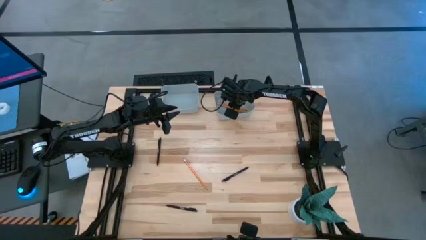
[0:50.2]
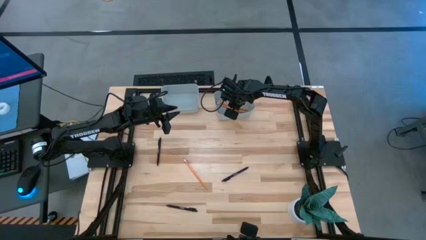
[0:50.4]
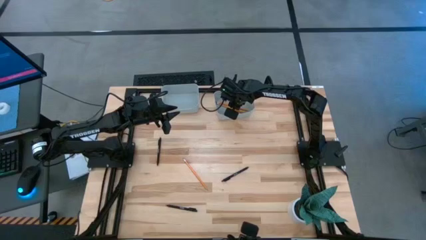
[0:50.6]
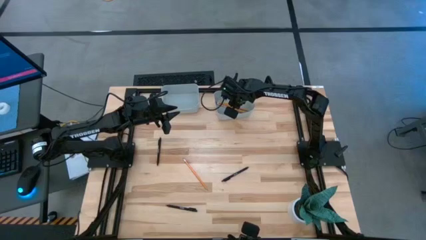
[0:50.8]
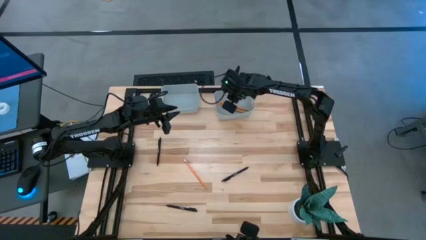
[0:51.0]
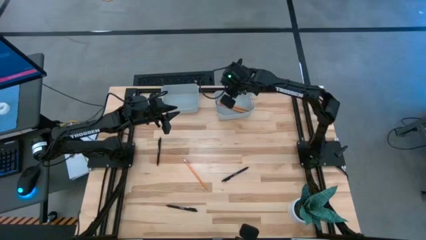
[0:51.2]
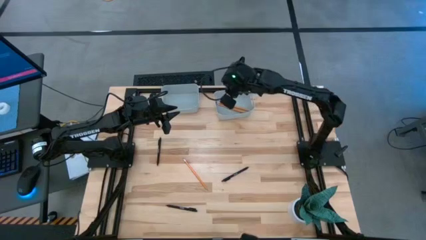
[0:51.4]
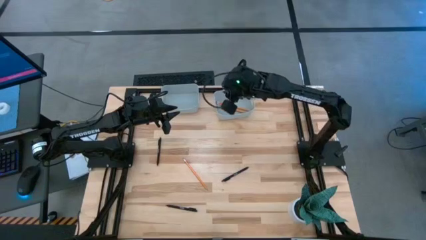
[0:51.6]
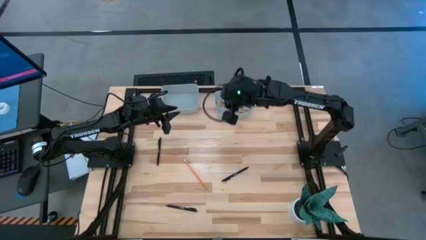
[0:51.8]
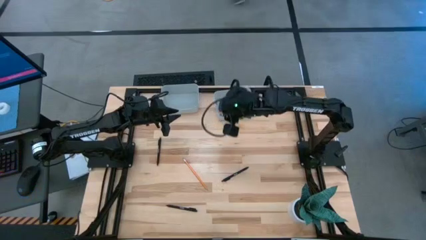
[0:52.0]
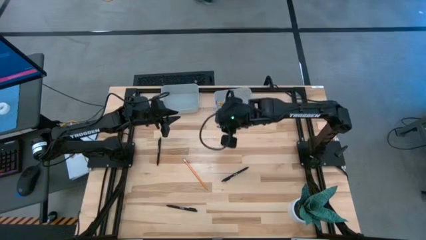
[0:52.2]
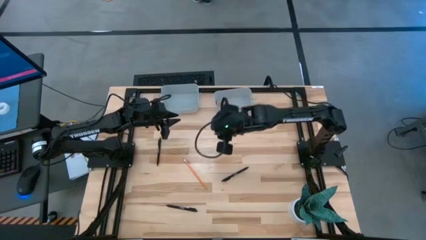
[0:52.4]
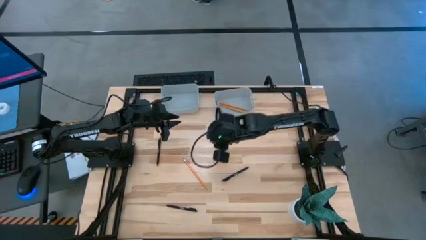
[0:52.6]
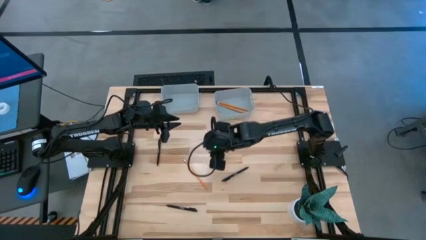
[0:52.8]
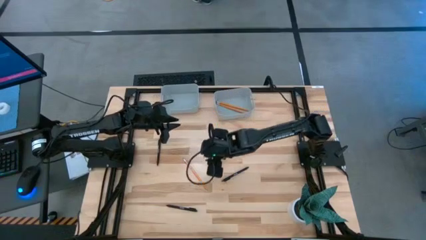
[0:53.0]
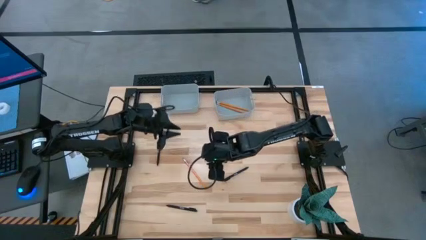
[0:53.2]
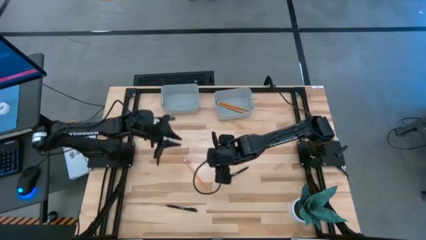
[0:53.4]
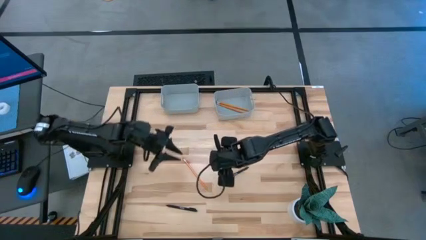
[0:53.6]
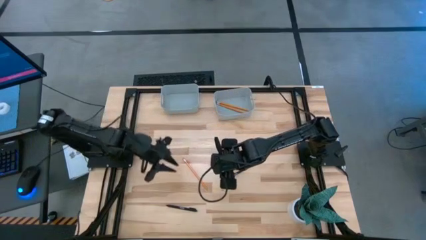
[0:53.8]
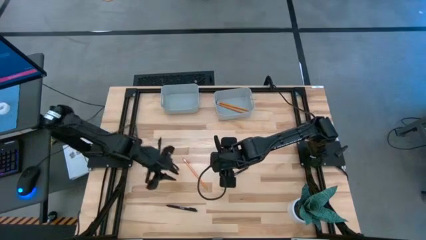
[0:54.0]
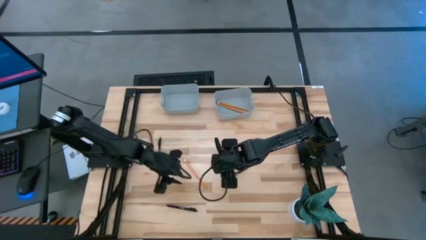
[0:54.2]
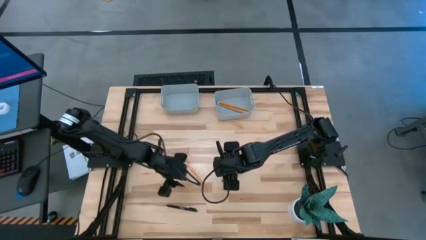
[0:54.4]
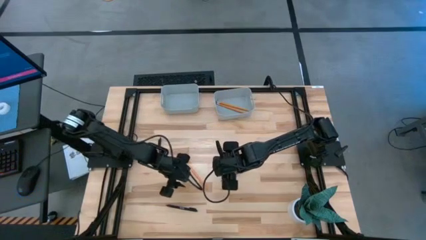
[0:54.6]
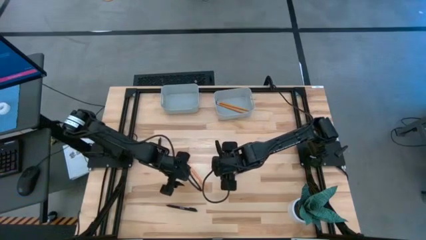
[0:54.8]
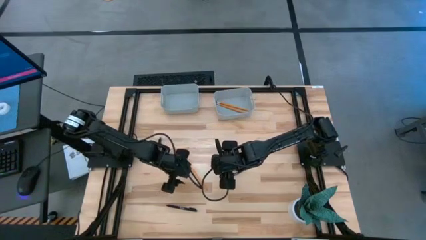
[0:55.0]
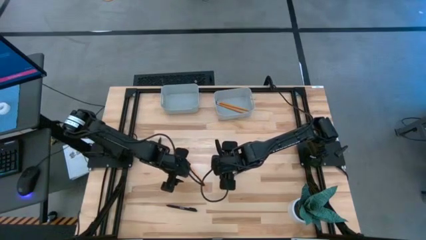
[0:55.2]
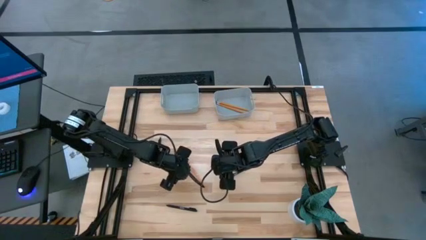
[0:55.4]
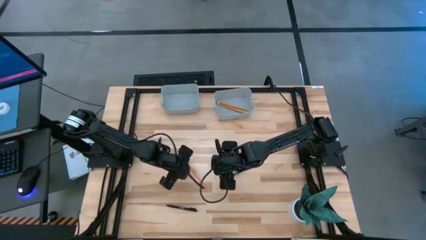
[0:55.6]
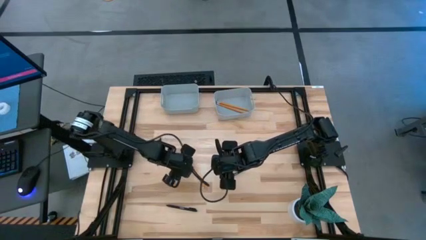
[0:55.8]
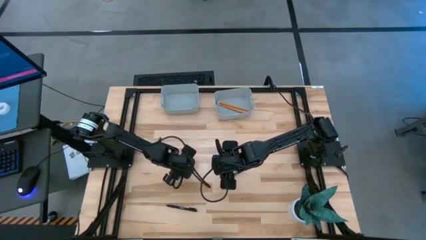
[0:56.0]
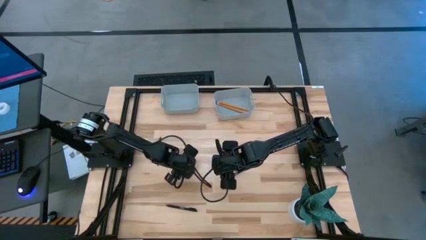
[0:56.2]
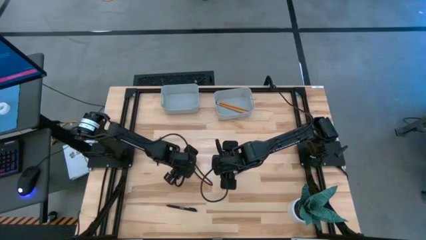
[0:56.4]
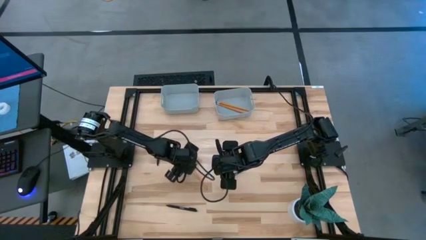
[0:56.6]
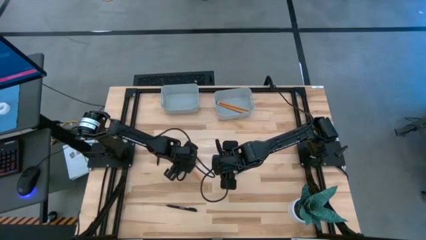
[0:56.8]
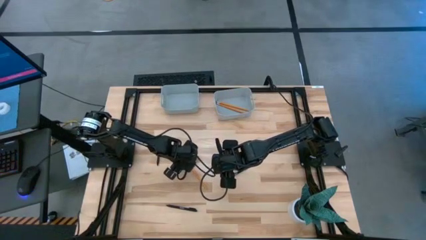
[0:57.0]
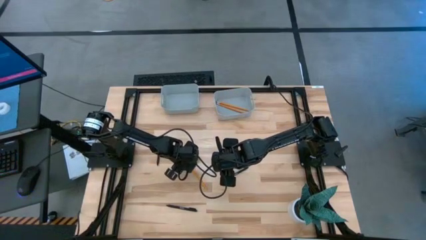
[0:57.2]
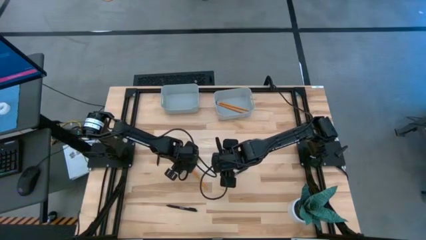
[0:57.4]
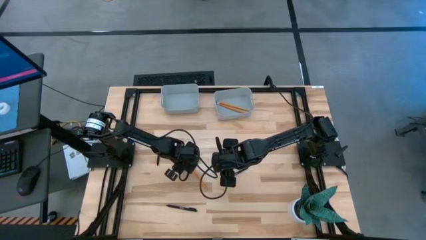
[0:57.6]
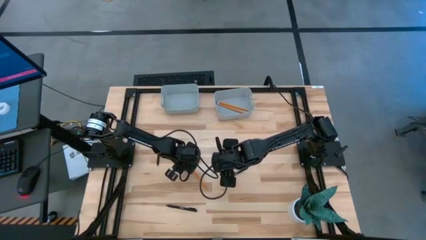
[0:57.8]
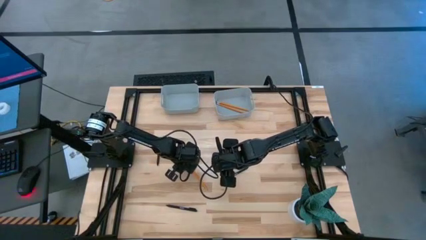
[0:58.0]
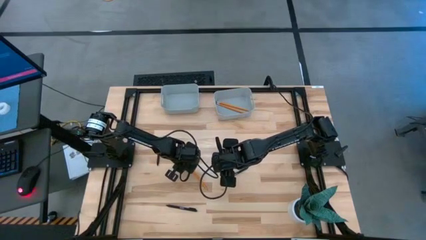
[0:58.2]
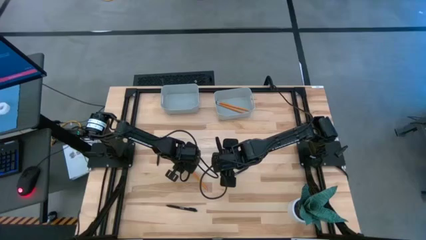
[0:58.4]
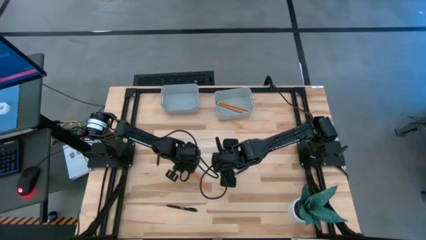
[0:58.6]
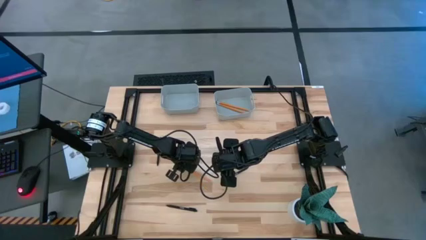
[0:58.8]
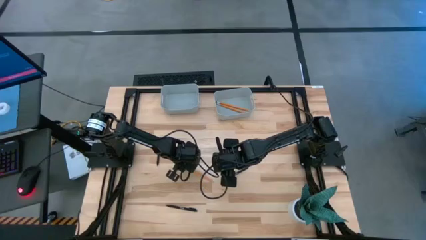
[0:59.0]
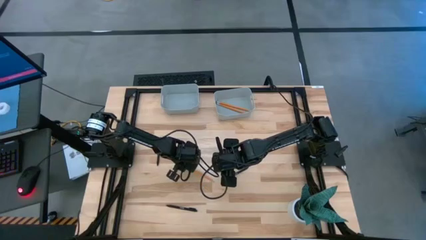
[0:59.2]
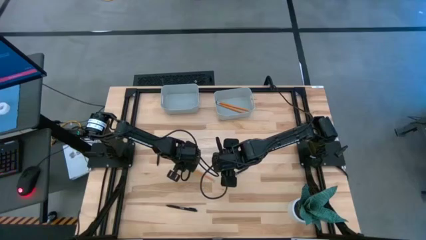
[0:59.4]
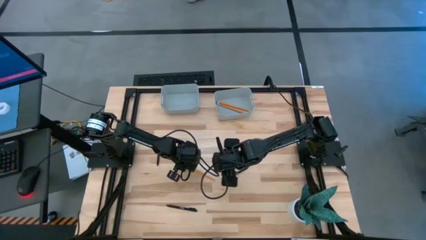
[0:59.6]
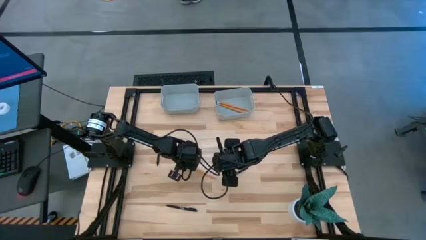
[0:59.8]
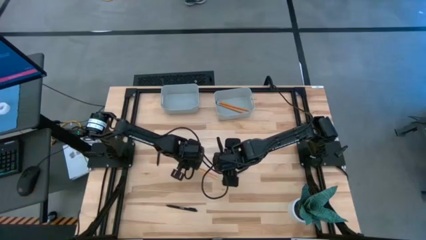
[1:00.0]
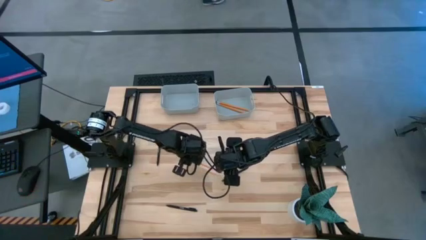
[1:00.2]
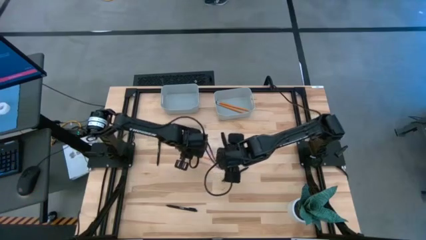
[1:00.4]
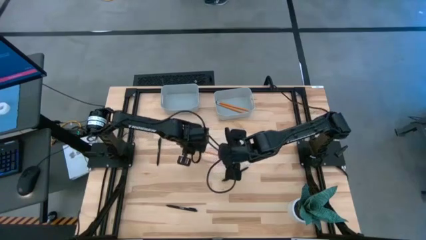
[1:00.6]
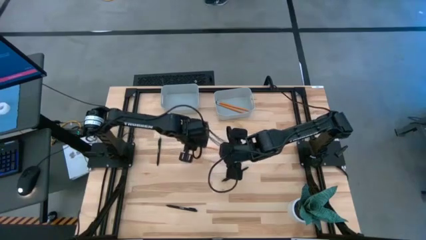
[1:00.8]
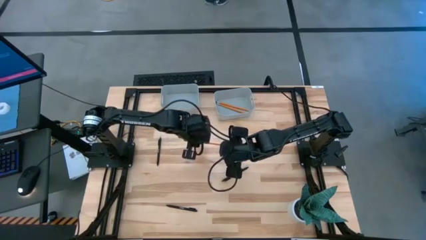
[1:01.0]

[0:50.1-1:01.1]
Task: Sort pens & pencils
Put the pencil into the right gray bin
